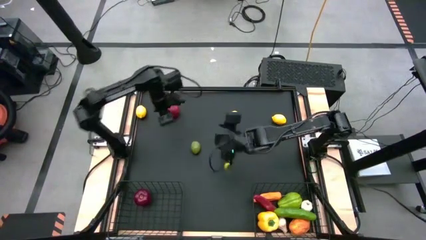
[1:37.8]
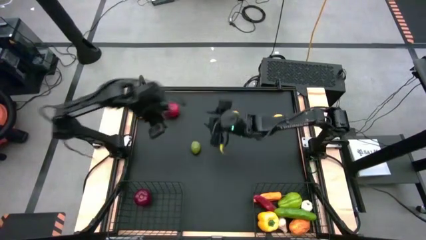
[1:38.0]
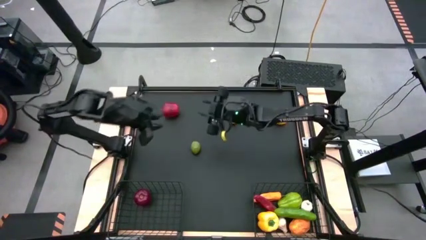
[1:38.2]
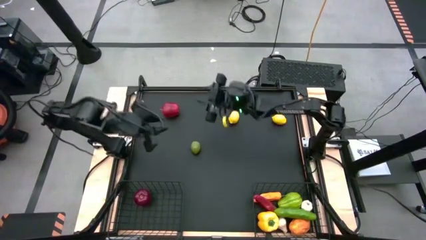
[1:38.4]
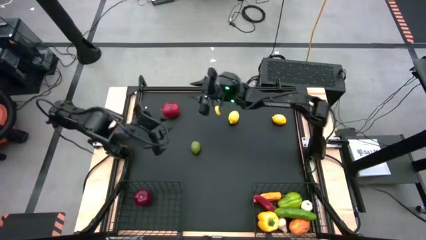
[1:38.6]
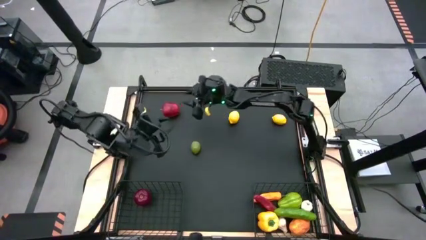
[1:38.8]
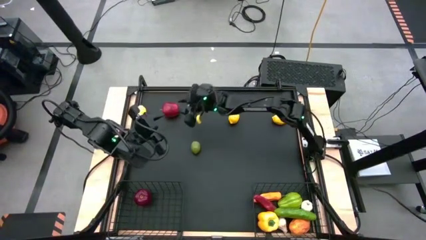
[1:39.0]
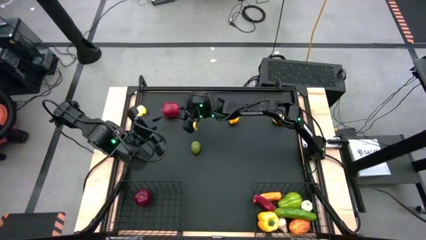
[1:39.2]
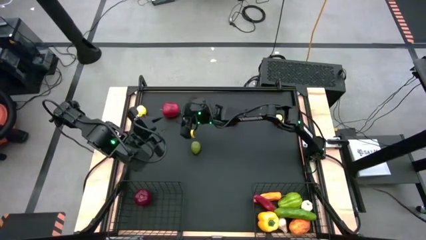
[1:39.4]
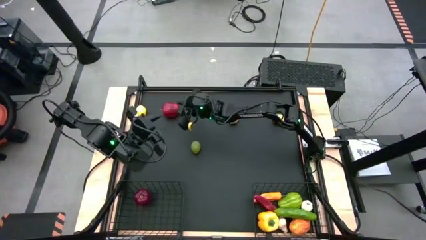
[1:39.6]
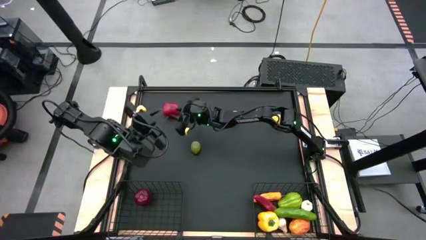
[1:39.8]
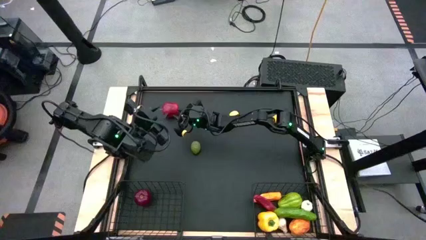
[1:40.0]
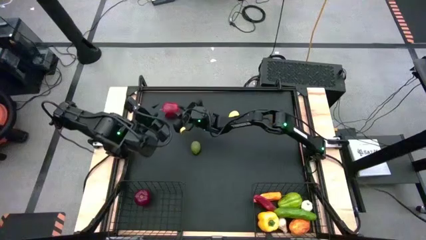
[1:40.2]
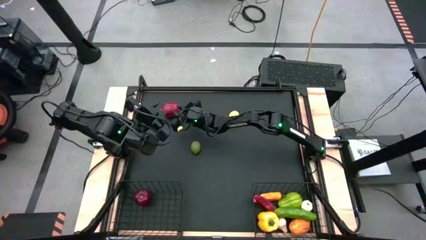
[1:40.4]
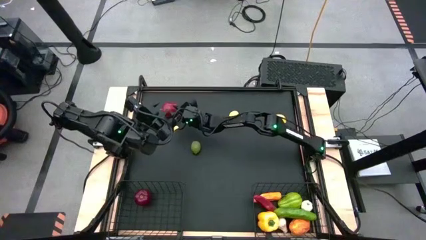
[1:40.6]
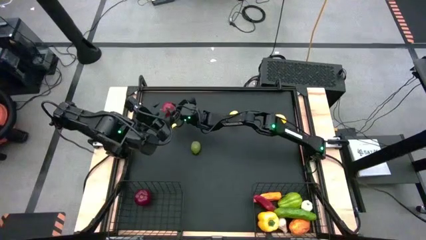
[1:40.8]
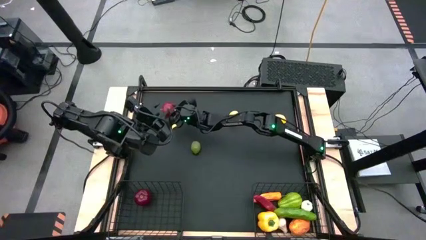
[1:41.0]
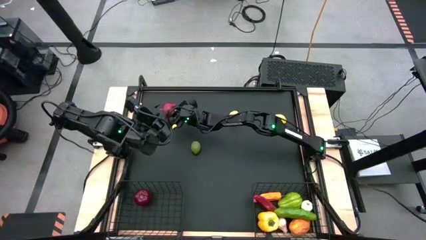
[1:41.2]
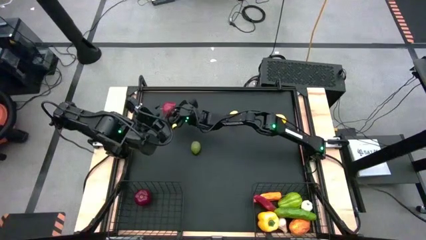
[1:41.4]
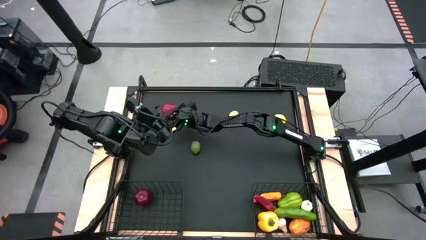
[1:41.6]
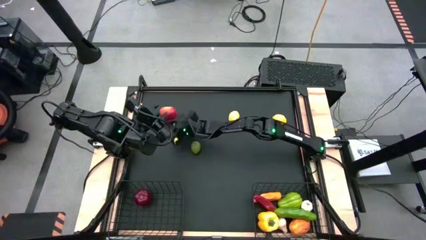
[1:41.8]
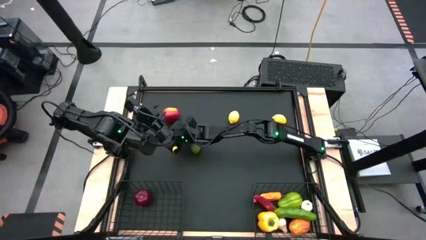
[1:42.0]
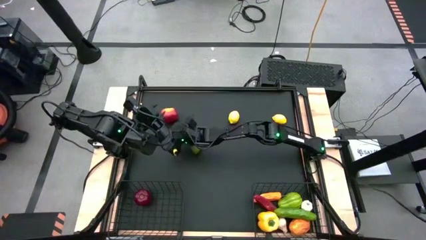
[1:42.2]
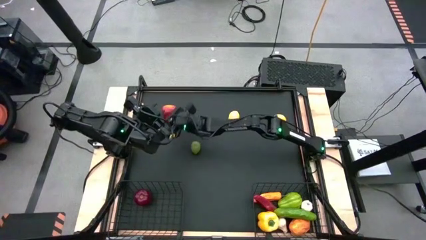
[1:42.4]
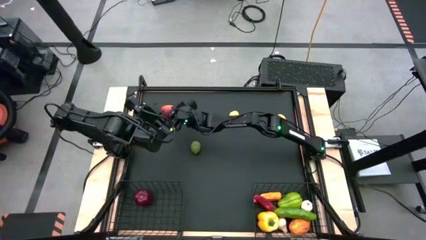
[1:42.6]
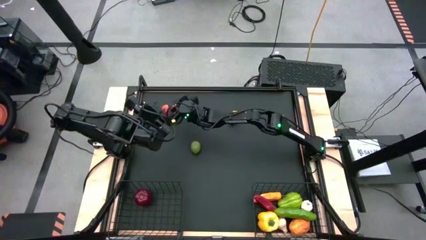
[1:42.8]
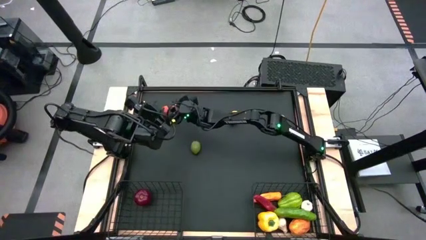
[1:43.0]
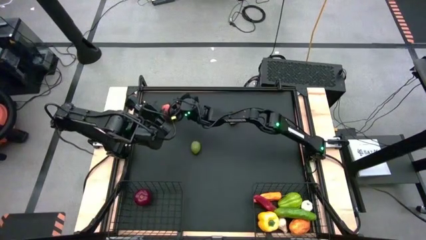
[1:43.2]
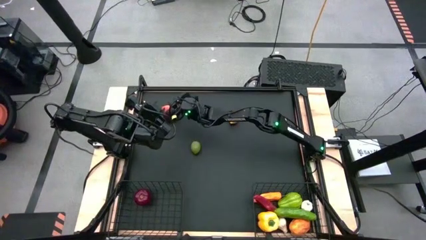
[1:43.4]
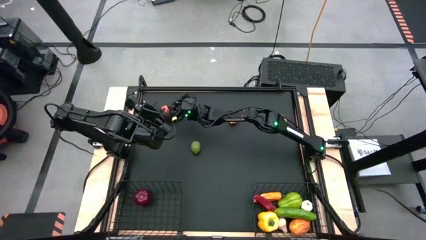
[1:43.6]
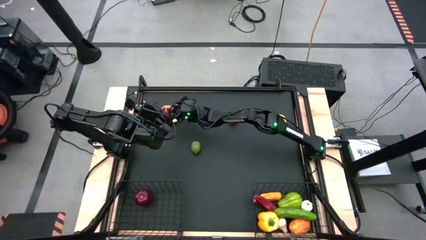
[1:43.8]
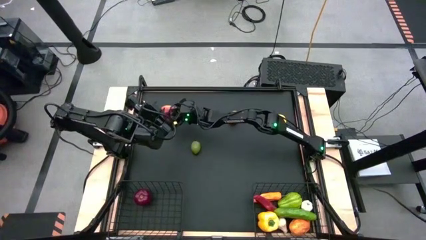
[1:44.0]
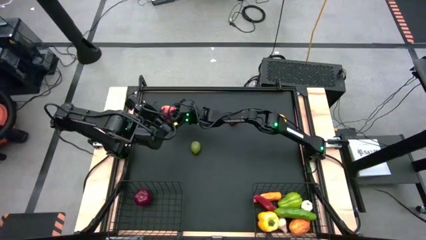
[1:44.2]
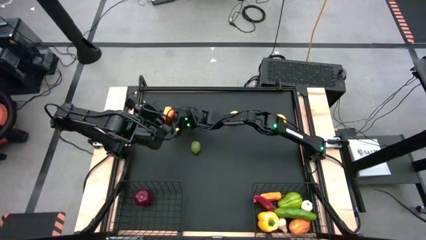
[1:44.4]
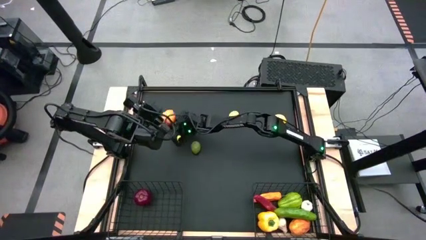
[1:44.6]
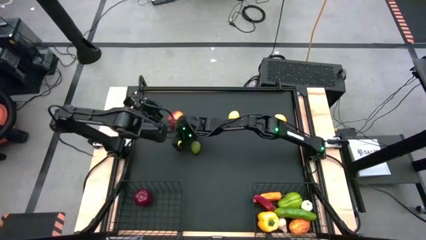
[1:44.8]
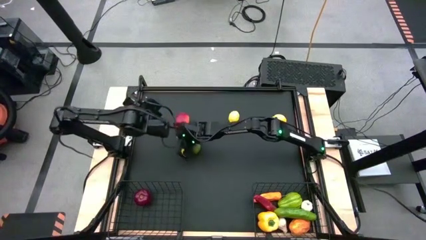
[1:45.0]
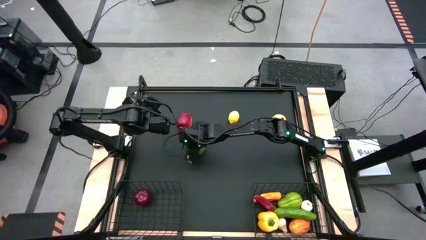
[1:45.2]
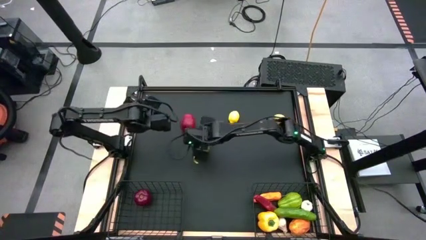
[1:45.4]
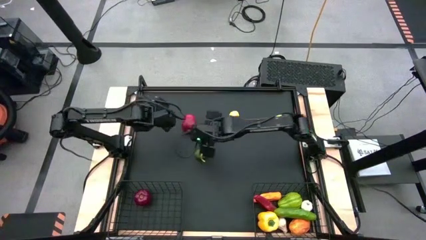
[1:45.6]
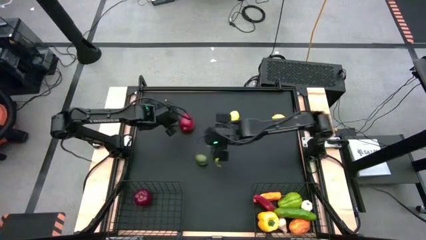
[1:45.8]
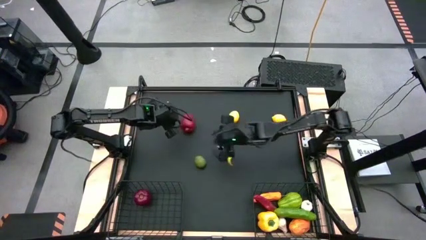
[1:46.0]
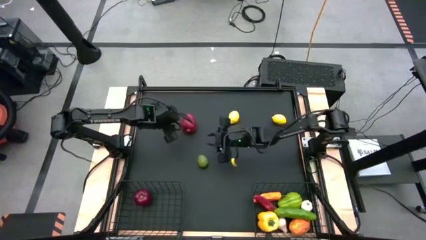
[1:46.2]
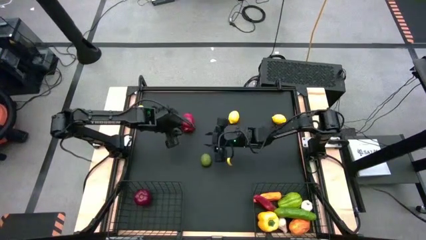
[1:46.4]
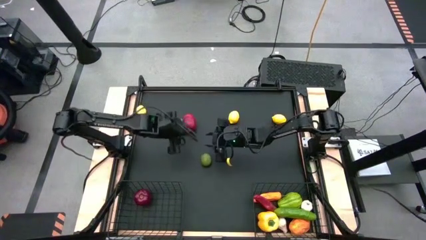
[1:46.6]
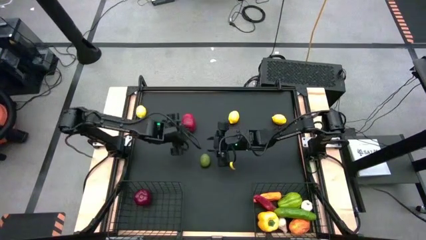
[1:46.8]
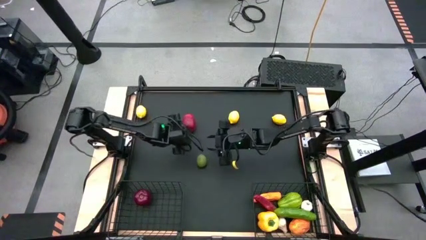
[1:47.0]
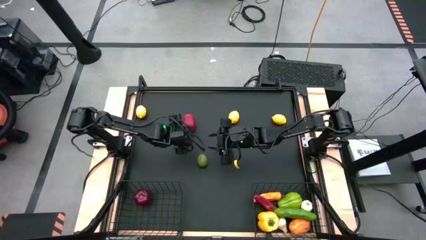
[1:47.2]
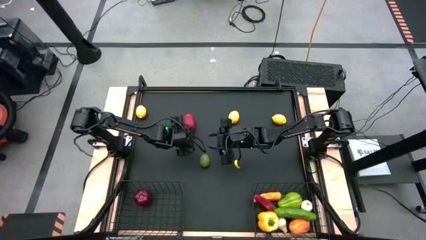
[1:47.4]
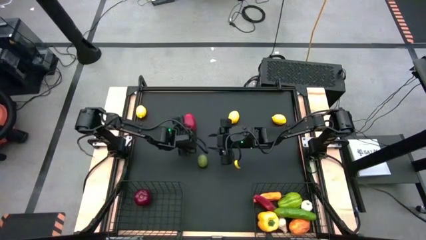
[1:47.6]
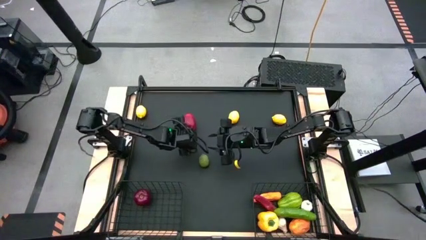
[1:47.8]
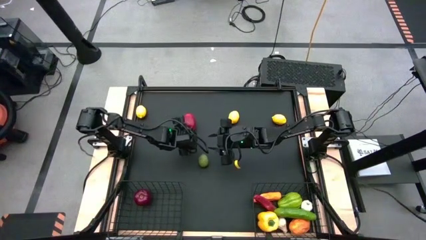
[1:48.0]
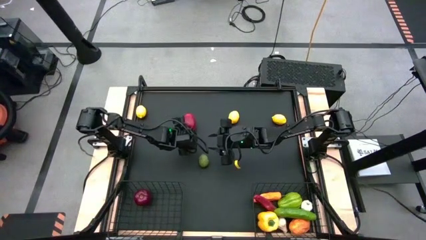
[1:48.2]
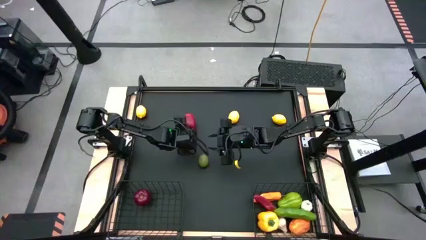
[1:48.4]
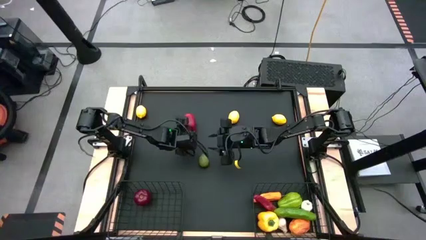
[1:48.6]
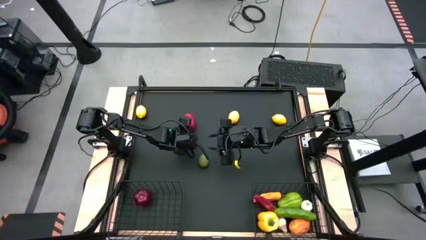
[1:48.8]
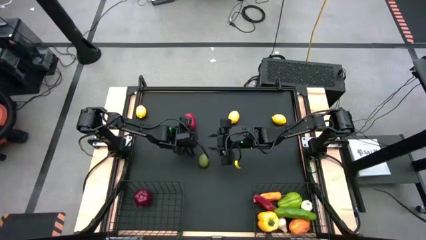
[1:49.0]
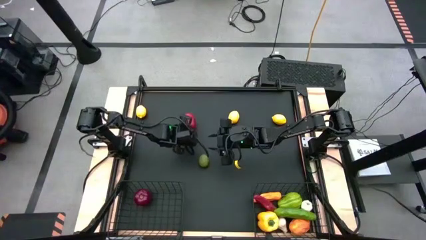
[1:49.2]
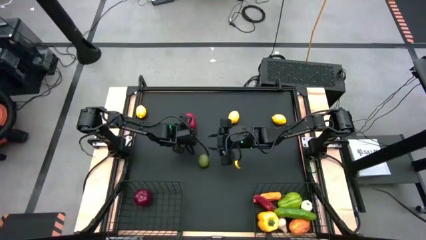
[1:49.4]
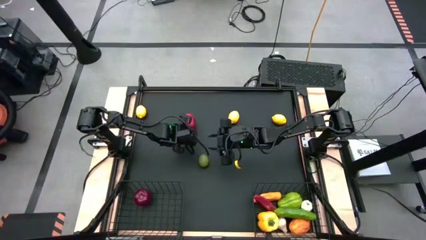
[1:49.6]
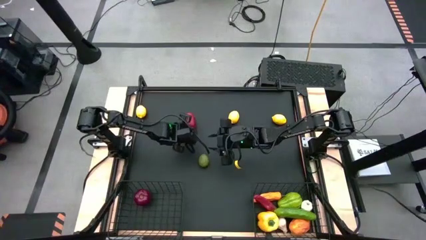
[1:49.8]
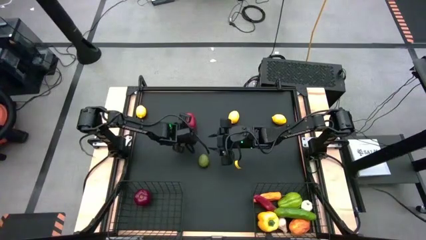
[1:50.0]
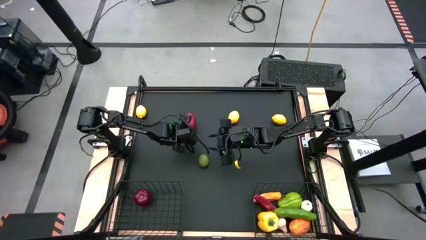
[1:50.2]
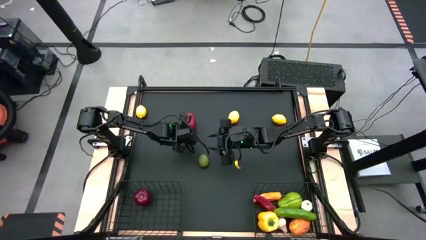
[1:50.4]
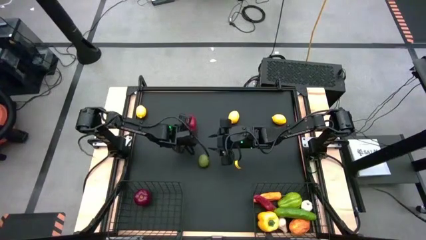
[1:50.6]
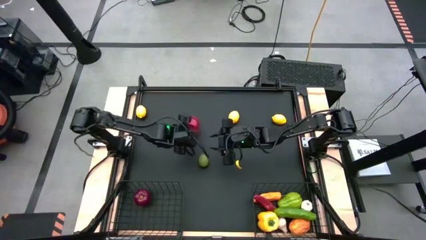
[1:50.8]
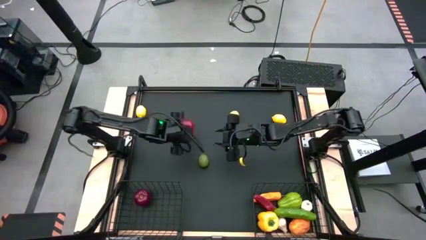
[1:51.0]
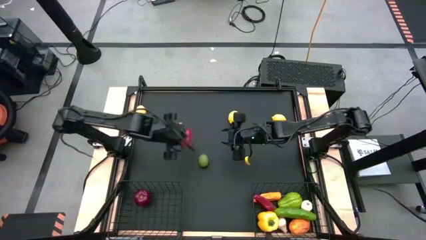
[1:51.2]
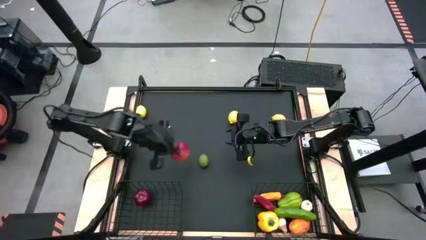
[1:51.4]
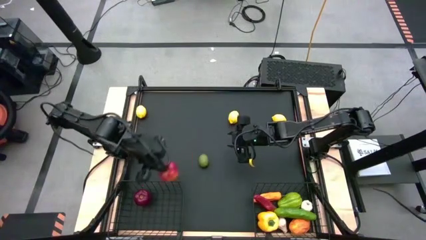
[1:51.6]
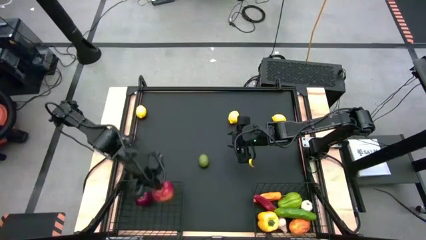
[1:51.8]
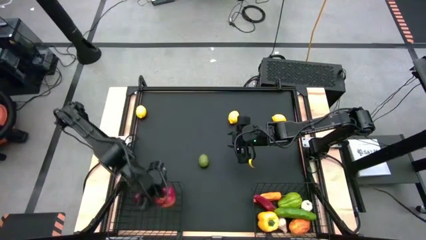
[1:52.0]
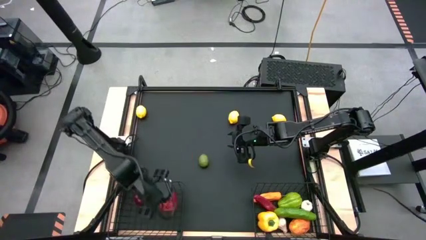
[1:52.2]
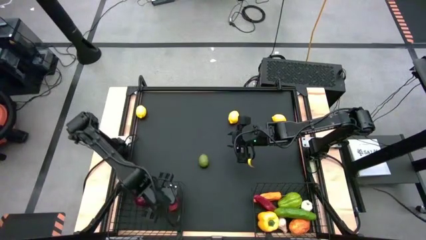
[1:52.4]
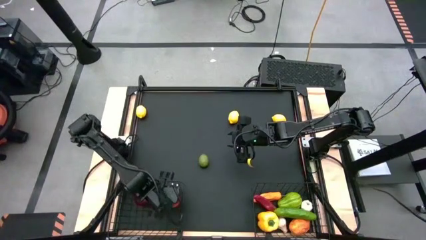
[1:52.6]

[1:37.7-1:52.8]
Task: Sort produce into baskets
Put the red apple into the left wire basket
